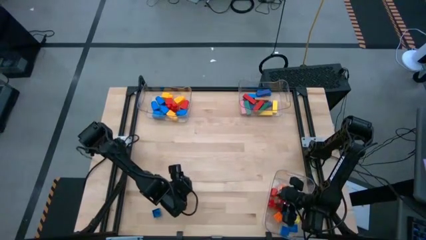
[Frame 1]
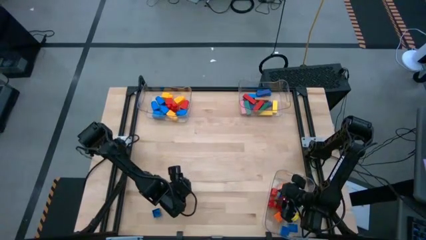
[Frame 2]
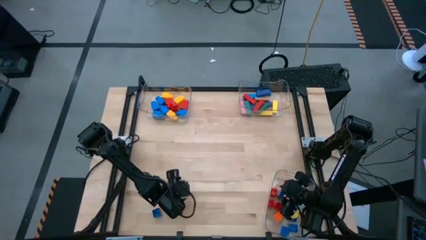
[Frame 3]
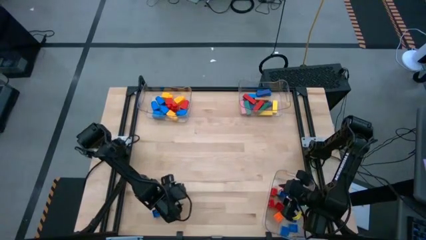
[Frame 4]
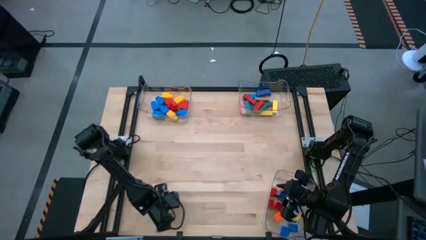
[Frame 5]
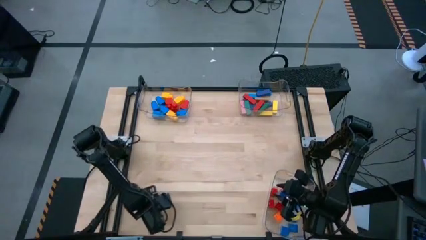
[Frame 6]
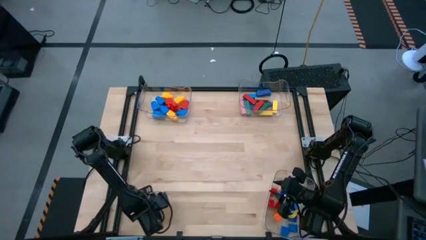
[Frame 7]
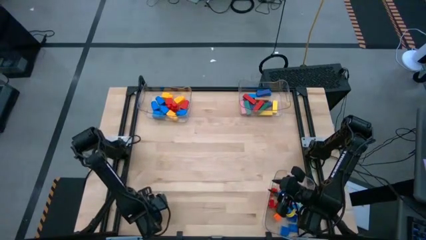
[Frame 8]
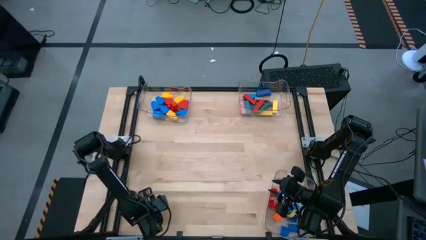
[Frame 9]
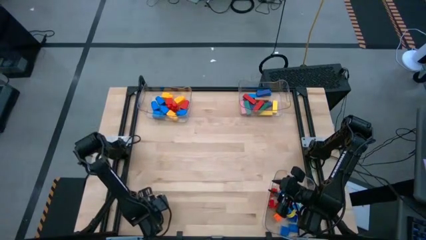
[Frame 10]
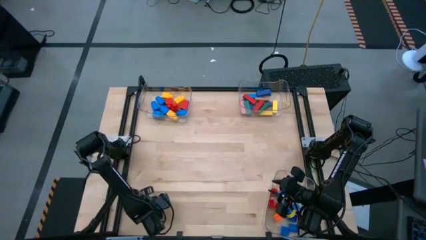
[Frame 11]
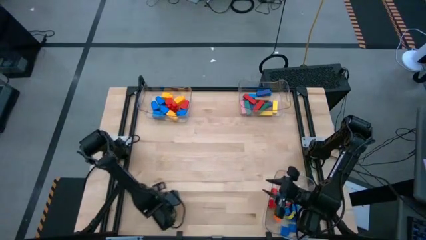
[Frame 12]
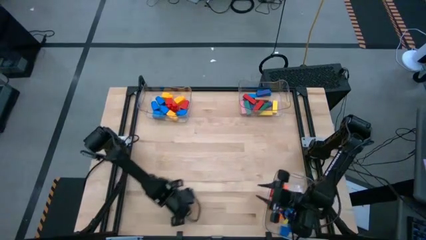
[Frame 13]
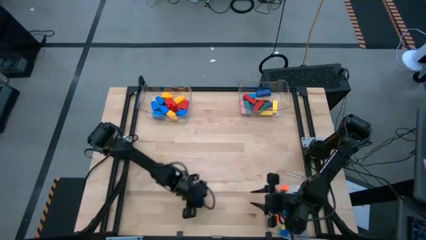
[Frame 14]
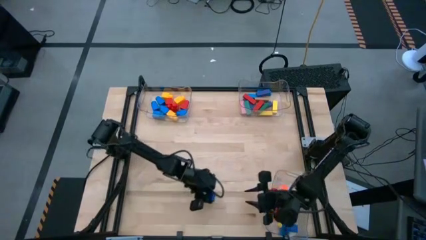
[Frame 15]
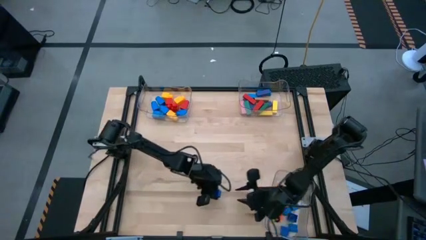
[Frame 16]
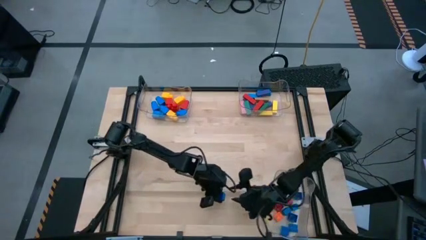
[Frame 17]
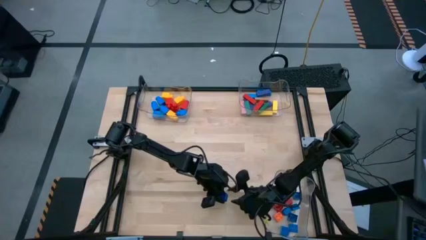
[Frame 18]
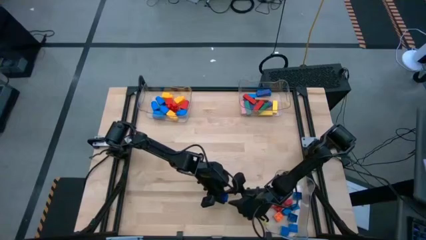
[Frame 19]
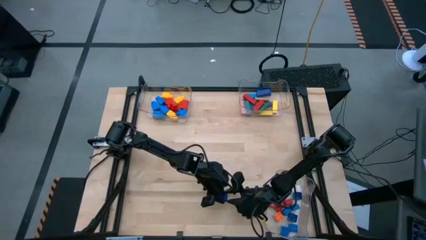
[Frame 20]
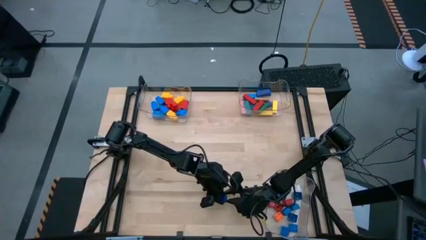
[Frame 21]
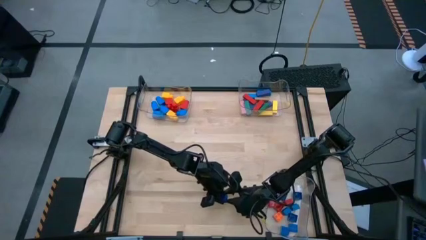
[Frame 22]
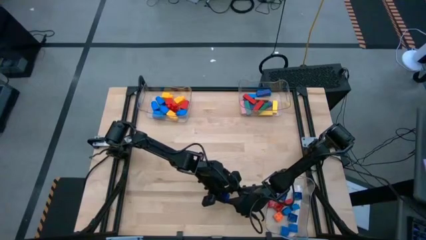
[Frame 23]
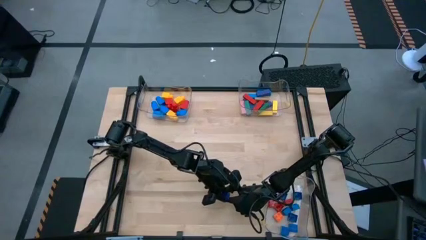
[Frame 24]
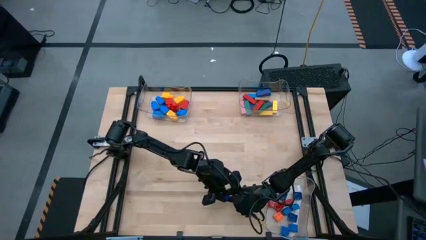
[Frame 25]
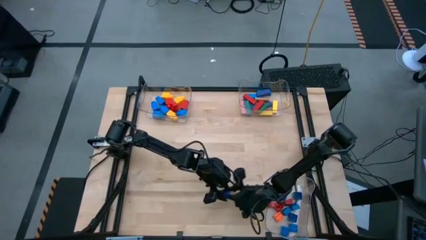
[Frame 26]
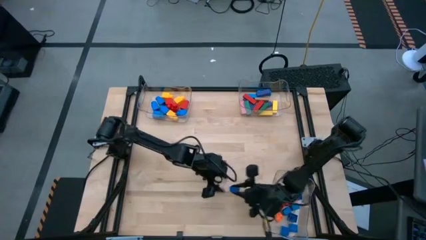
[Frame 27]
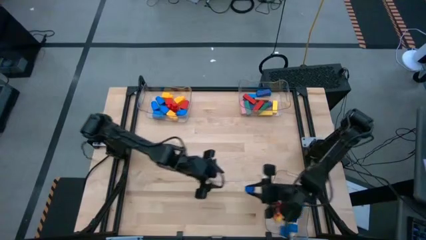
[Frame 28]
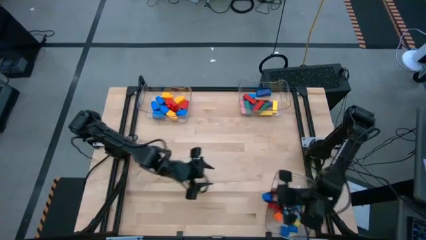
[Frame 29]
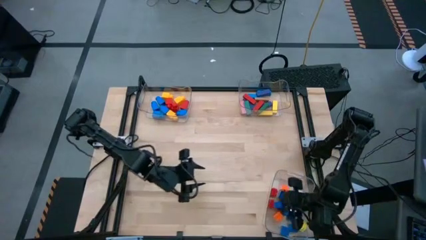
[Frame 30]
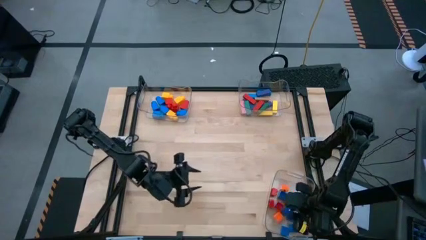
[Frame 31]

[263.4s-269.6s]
Task: Sort blocks by size
Put the 4 stud blue game piece into the bottom transparent bin

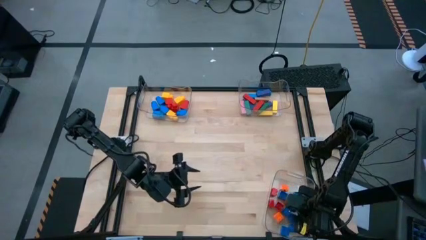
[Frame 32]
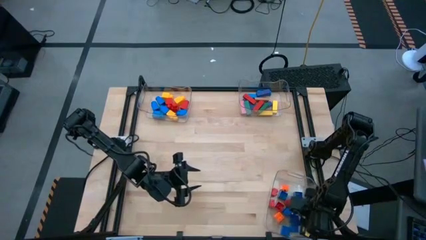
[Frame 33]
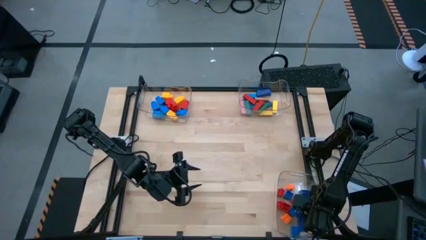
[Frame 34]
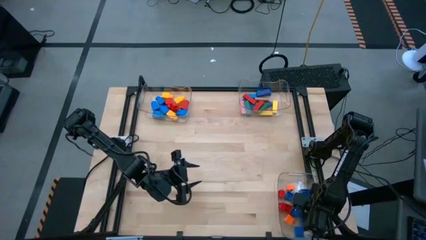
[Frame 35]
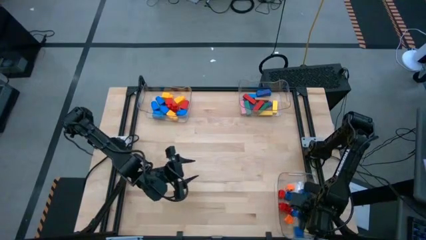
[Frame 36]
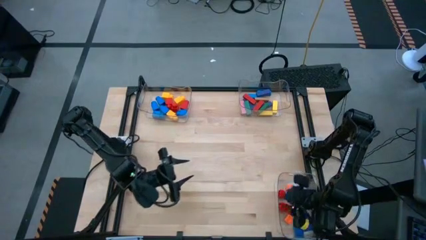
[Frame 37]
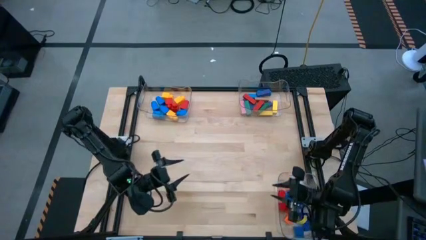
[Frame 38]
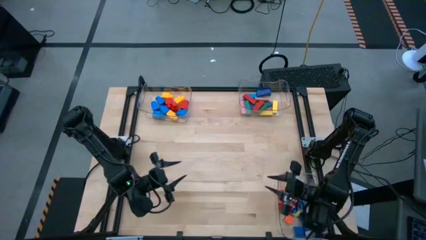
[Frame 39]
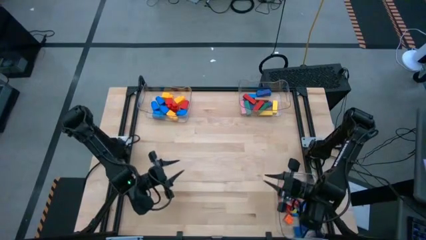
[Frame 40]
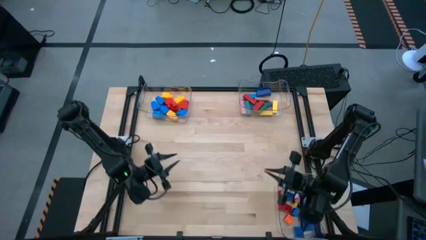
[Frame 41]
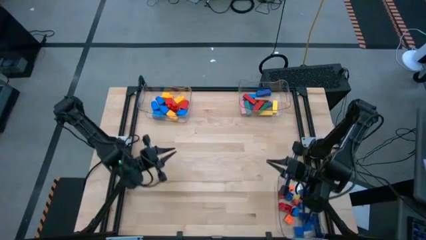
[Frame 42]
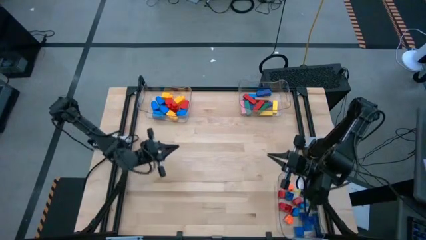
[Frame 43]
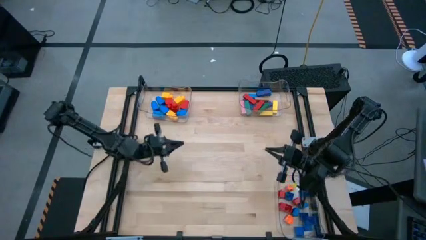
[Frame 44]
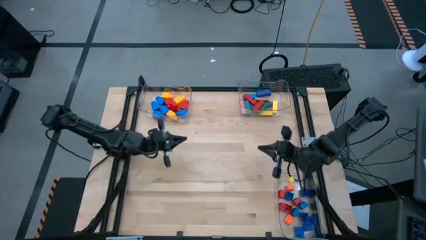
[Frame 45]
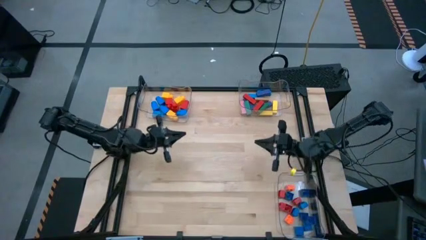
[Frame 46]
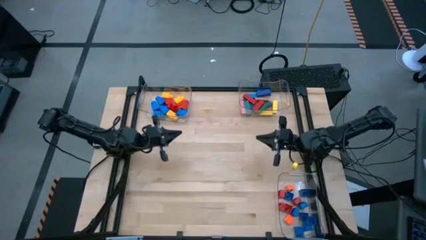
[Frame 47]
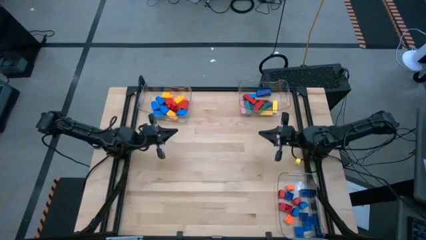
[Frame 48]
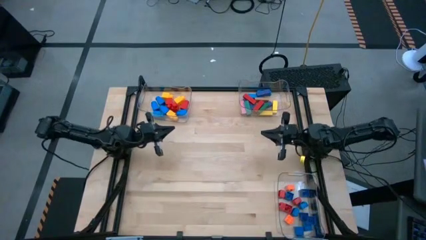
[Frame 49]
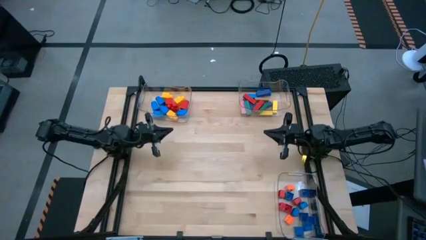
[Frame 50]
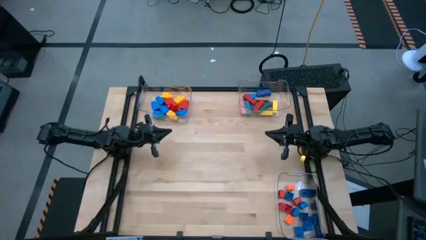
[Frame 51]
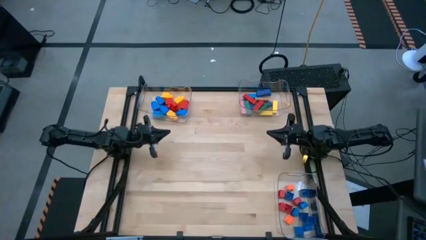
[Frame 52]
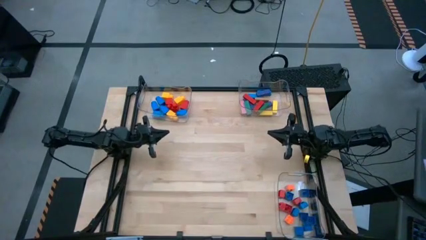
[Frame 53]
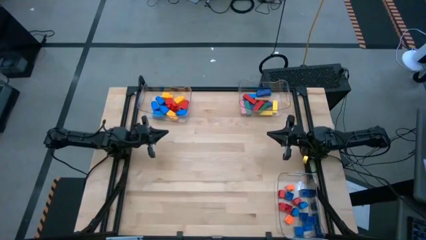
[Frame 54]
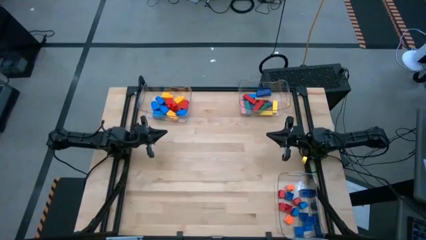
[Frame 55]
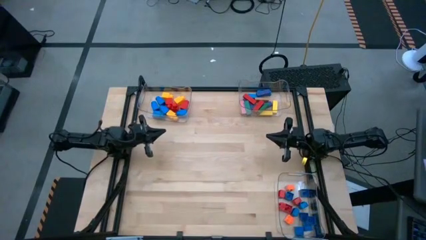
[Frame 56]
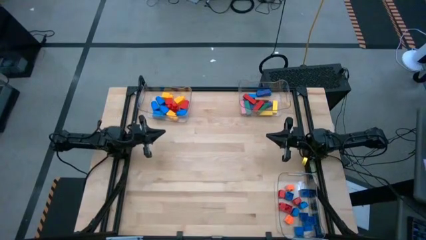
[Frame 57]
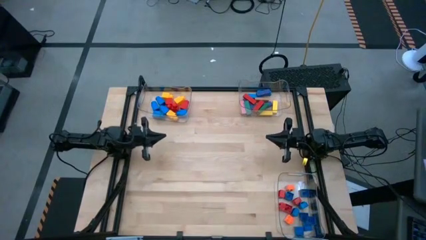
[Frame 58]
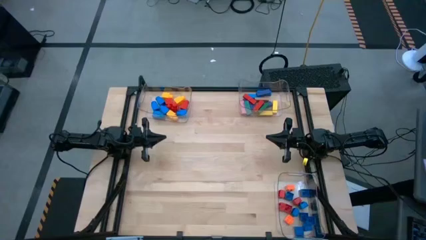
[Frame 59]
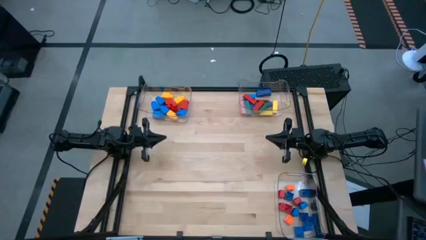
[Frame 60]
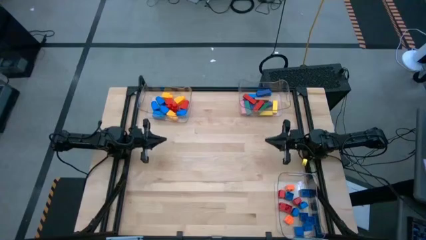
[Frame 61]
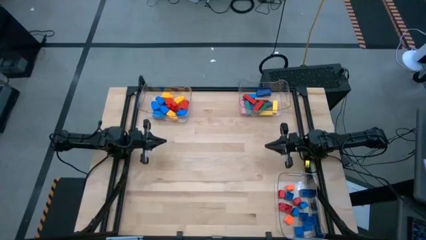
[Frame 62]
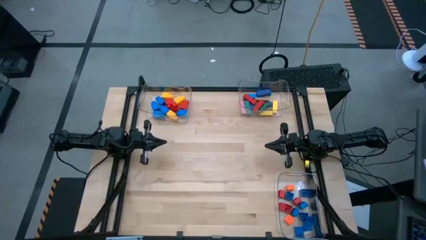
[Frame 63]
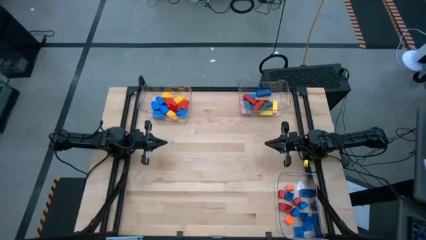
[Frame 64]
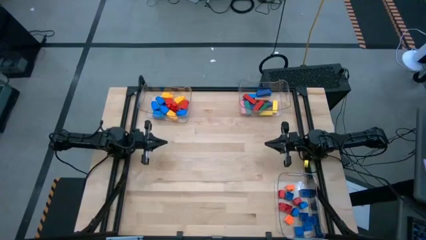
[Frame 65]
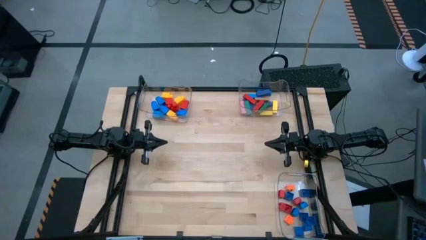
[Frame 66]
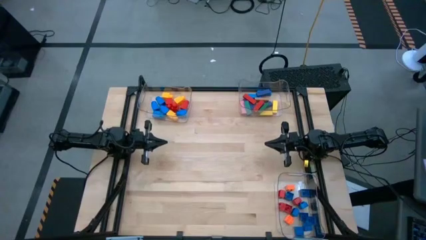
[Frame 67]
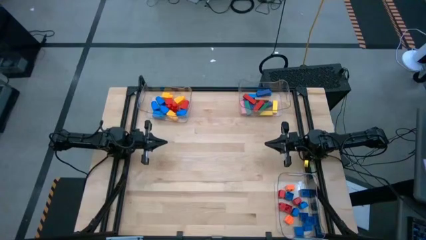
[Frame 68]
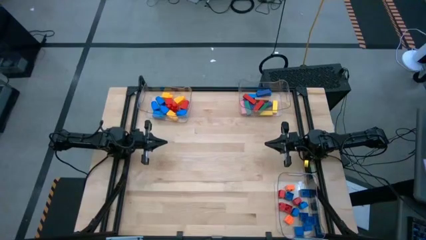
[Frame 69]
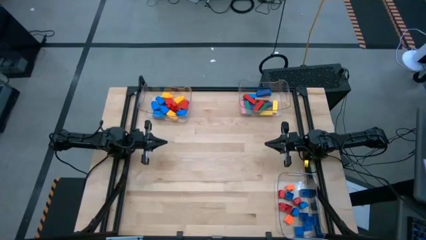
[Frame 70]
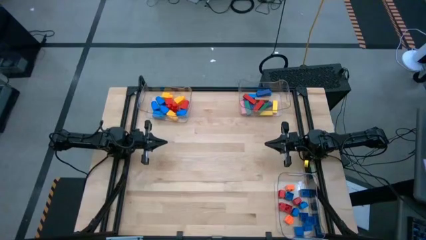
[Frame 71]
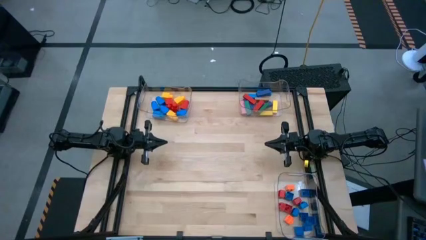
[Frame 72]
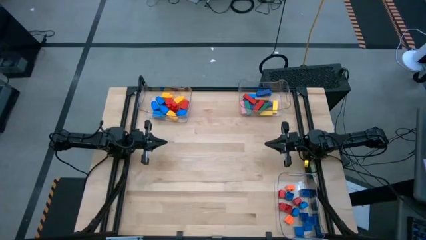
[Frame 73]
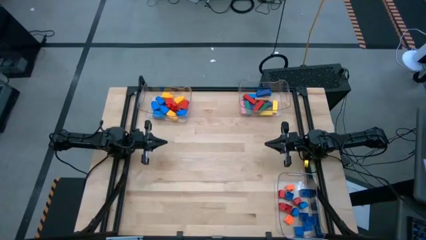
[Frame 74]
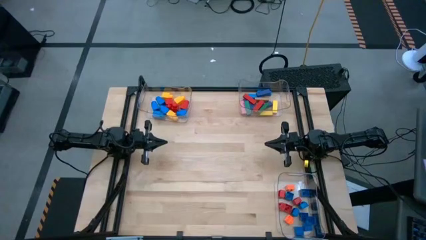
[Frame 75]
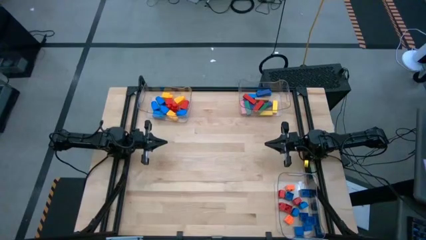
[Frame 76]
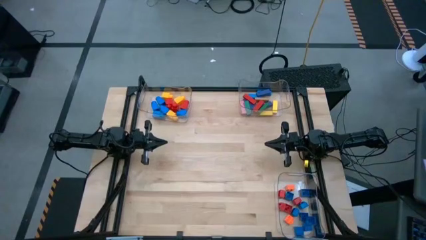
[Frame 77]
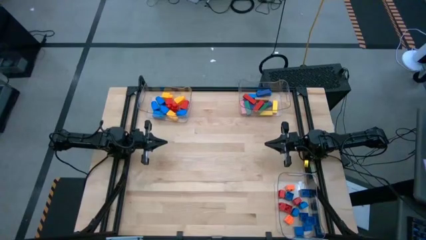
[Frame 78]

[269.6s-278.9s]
Return to Home Position
